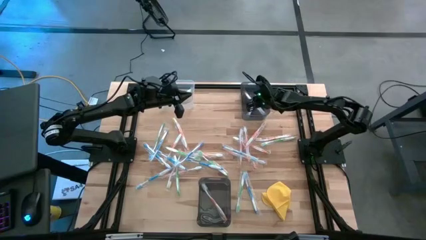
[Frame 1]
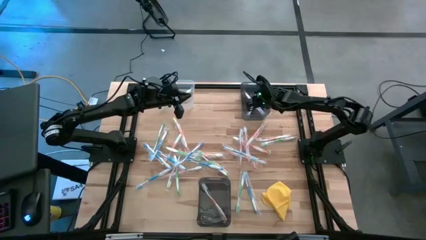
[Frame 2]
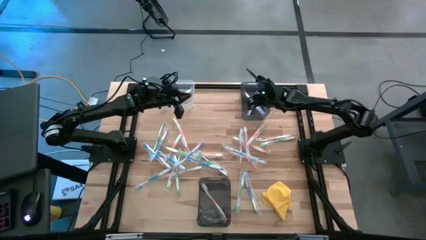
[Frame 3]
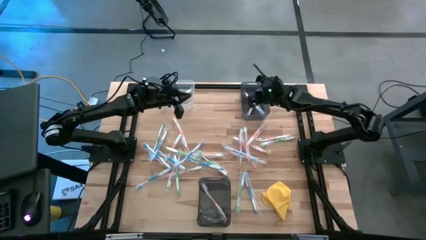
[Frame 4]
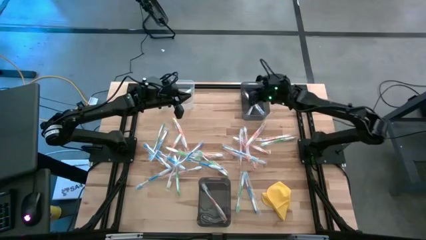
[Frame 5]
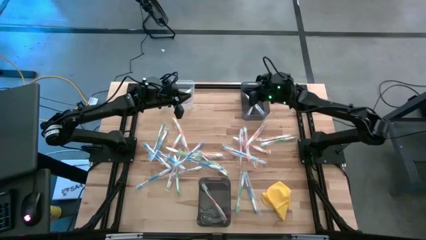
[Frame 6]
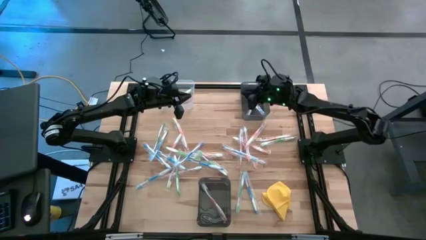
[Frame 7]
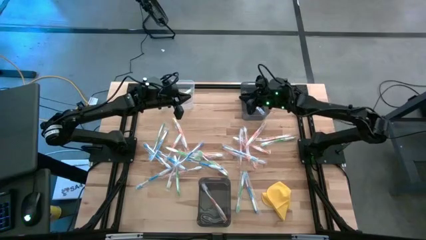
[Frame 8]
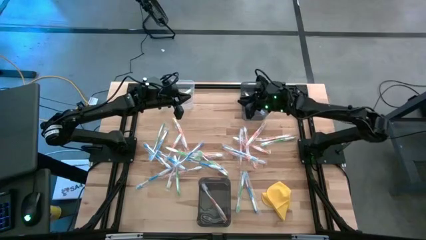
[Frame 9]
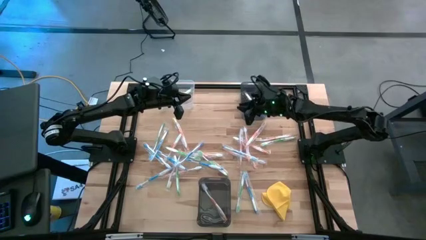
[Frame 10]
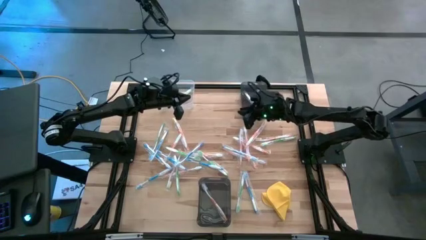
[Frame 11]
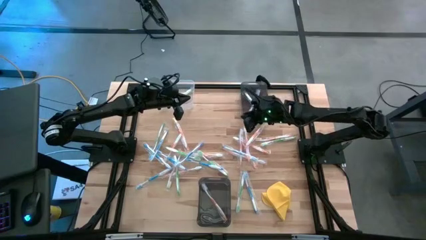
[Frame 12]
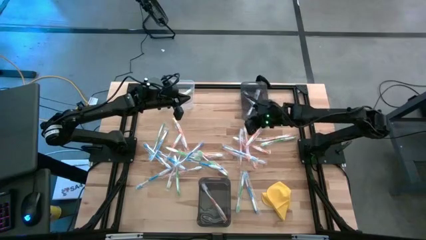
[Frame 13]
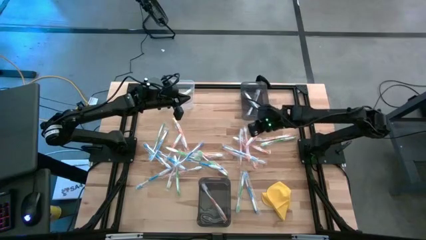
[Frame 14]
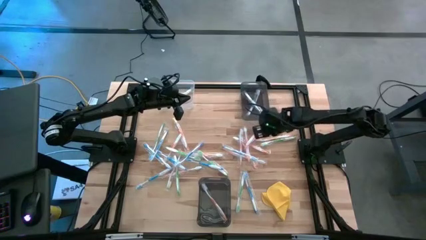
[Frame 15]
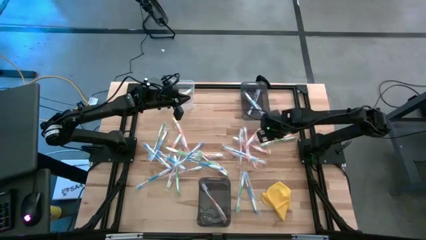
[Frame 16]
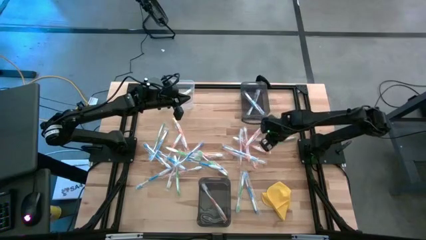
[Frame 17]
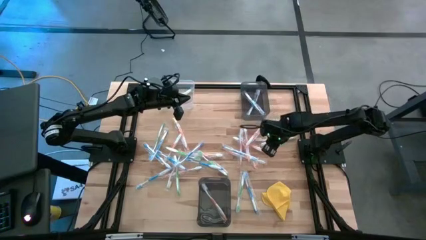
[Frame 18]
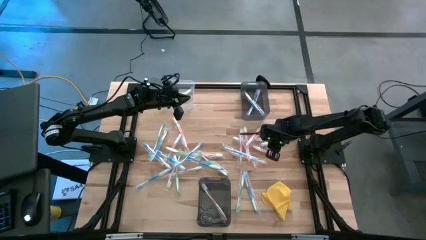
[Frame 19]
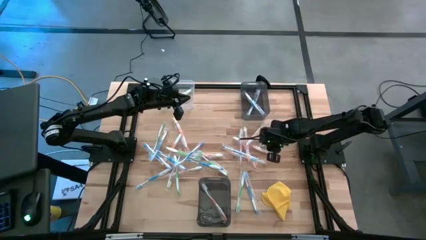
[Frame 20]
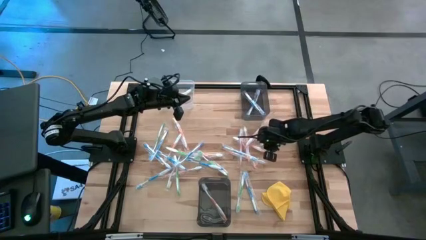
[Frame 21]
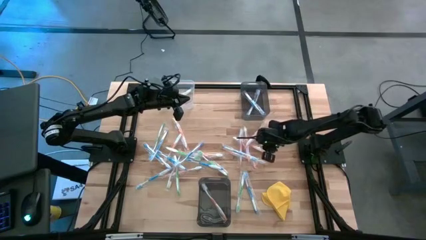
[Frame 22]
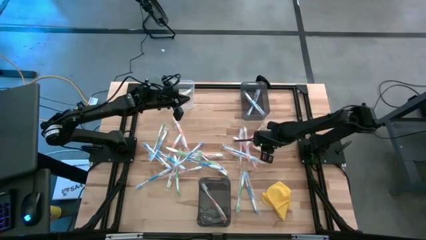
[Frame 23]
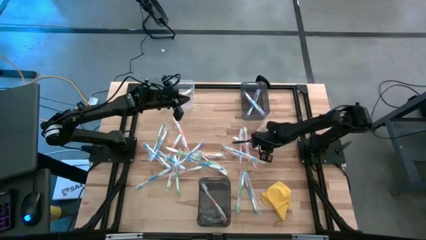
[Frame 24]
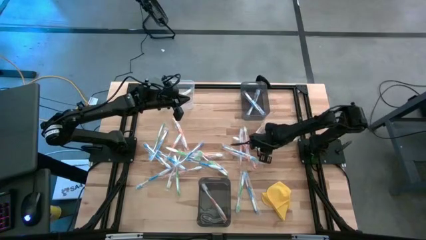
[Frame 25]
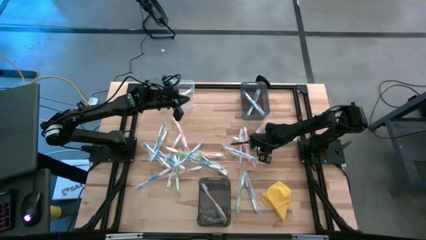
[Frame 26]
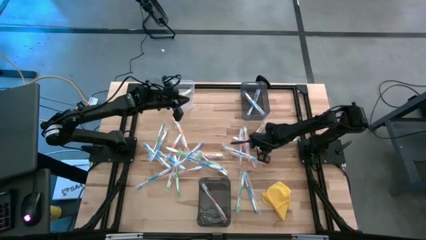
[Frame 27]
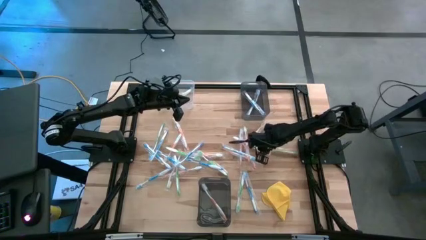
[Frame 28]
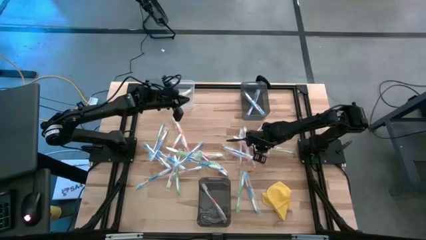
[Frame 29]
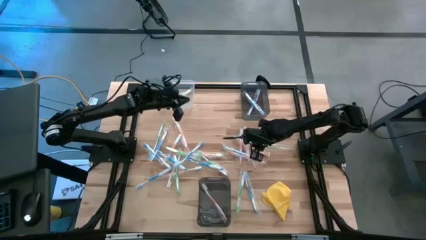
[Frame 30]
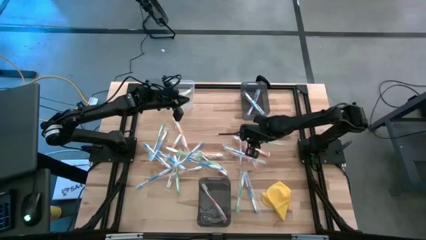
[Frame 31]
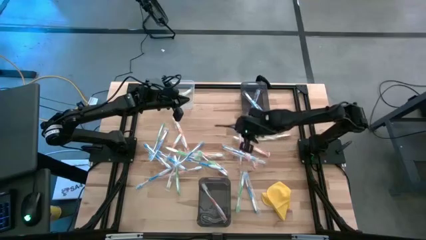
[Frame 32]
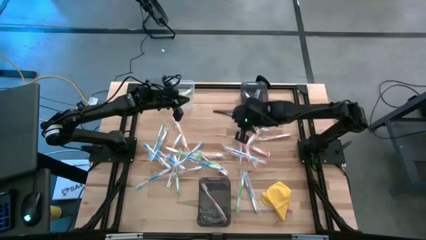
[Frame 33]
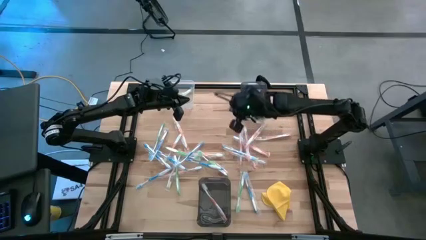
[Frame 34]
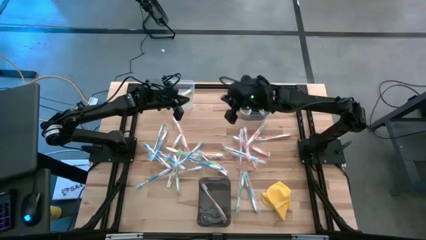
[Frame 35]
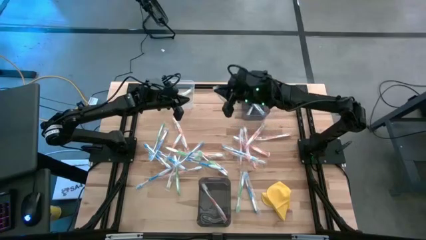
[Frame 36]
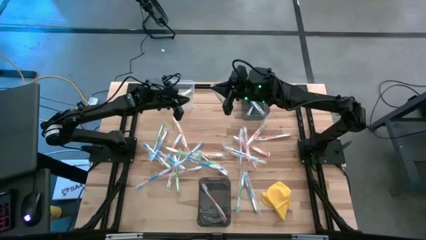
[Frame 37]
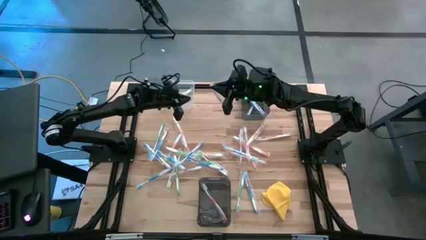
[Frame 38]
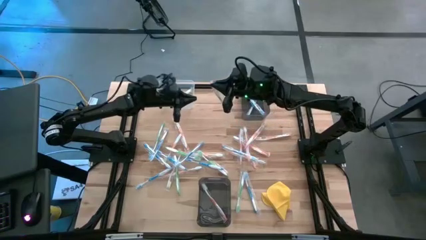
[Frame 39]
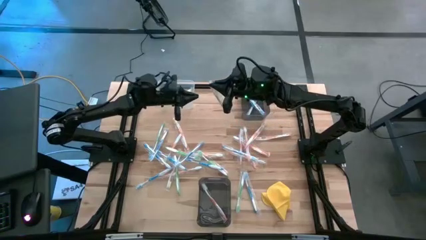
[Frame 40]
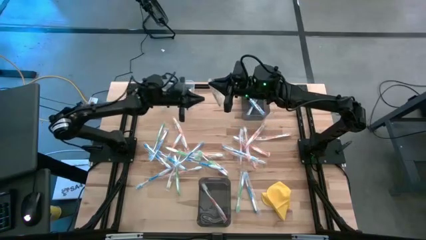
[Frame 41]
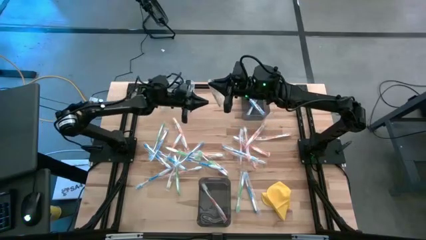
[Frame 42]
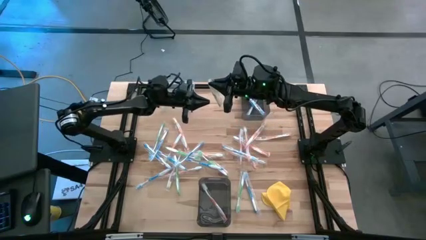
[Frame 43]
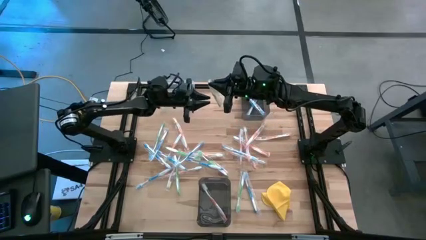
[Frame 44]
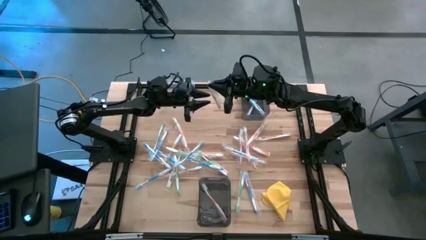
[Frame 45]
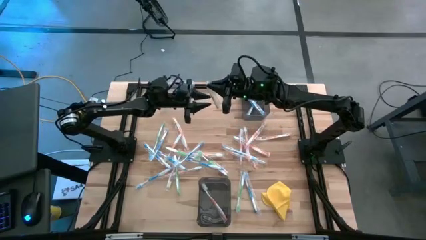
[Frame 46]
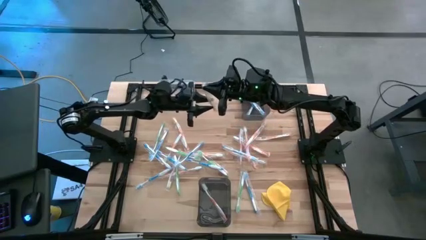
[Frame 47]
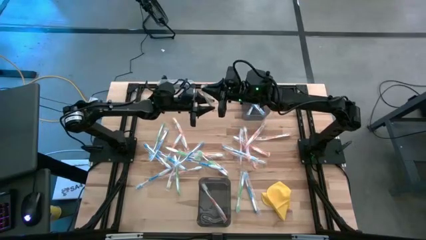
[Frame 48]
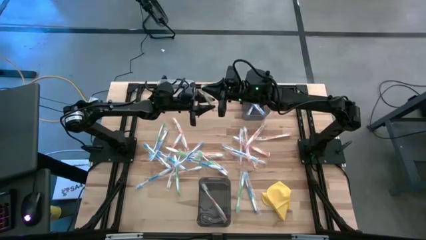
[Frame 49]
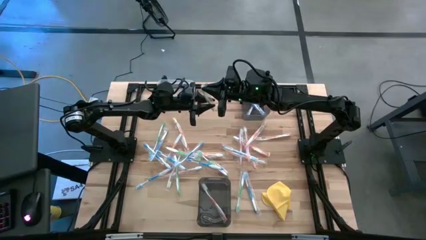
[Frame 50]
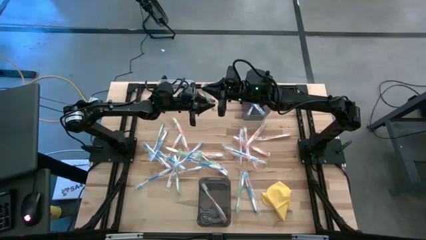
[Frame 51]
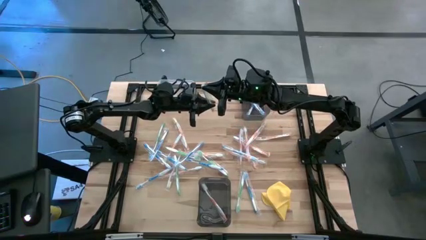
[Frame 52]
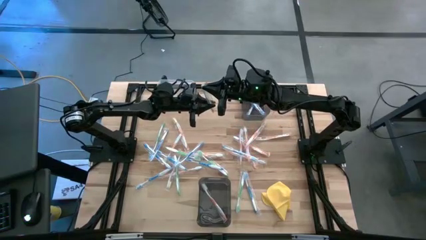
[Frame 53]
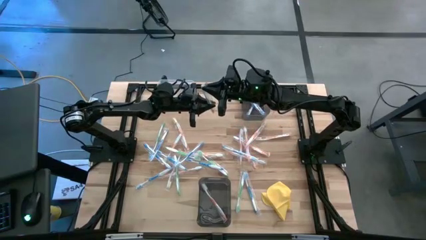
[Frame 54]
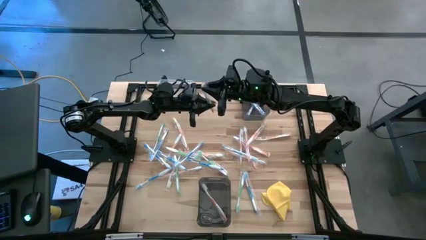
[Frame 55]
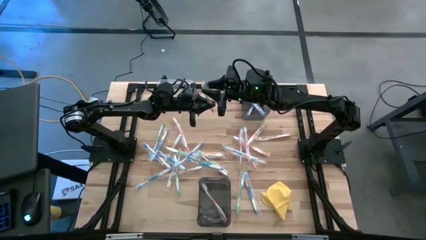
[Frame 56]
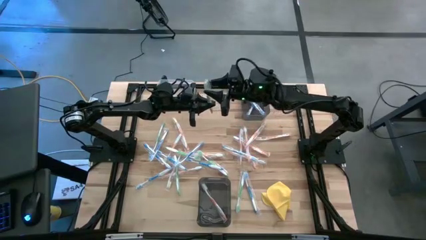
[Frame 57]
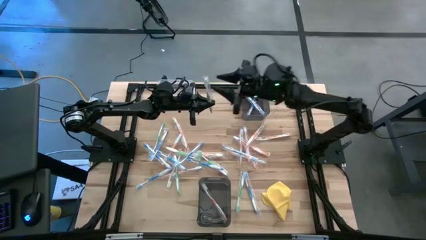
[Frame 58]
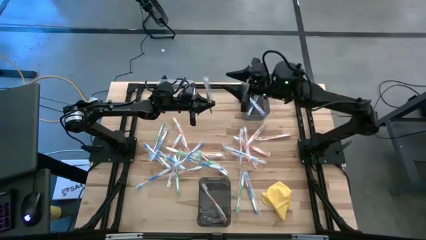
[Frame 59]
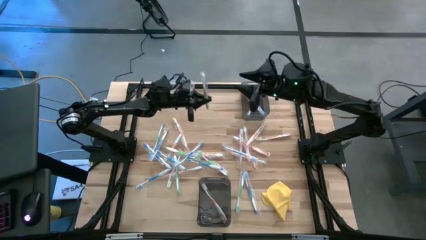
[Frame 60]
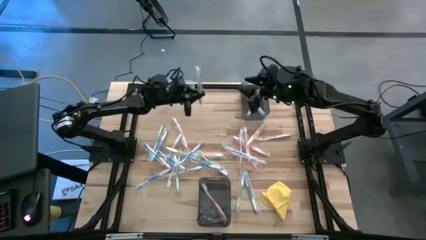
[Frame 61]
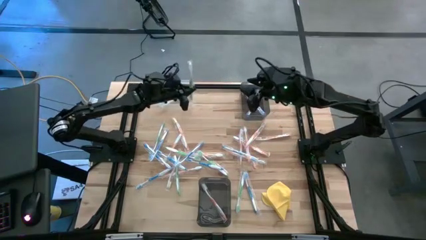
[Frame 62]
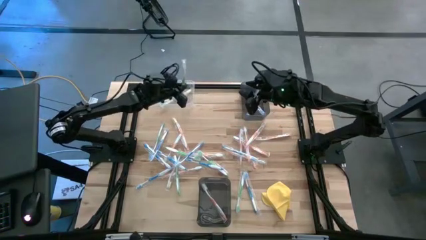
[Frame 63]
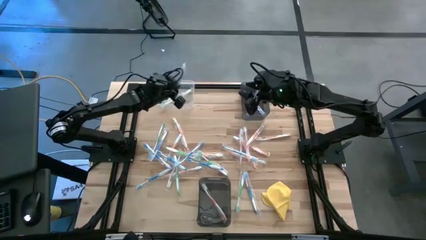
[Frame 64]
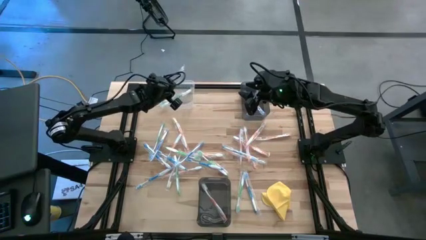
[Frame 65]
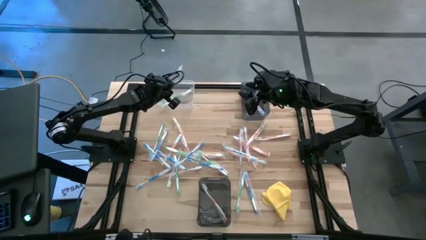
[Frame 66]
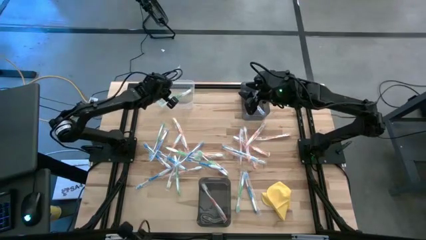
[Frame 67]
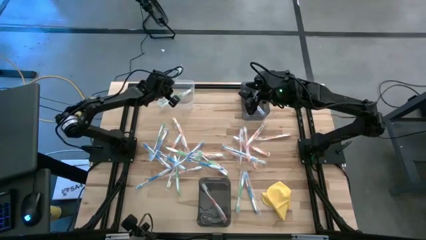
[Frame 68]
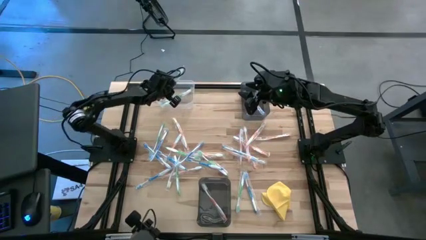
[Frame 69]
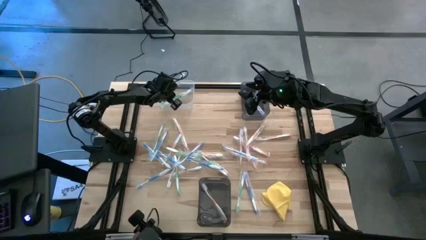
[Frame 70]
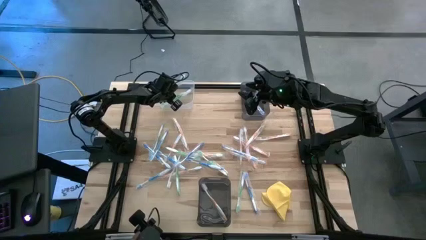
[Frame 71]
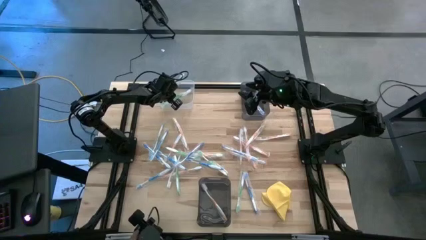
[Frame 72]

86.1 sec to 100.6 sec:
Task: Pick & Place Toothbrushes
Put the green toothbrush into the transparent bin
